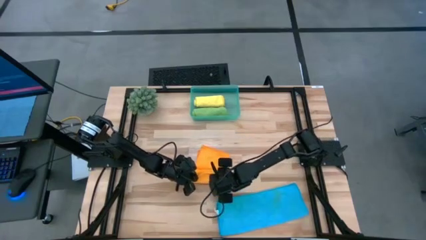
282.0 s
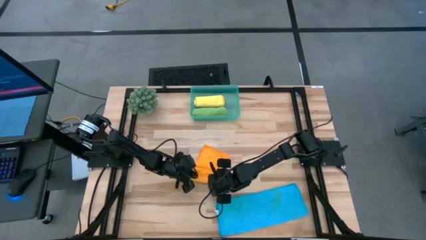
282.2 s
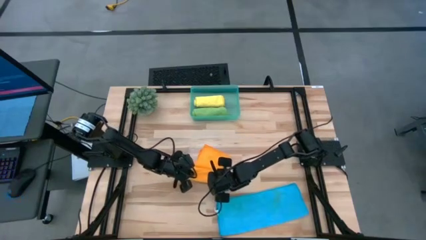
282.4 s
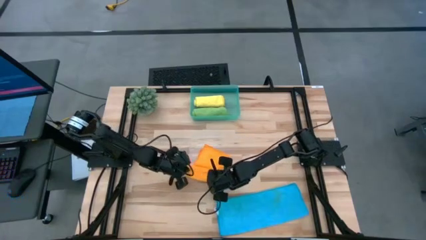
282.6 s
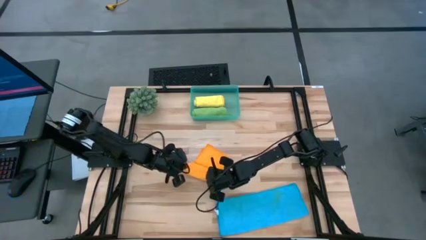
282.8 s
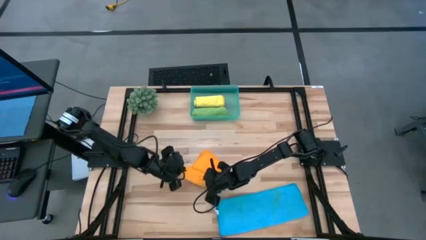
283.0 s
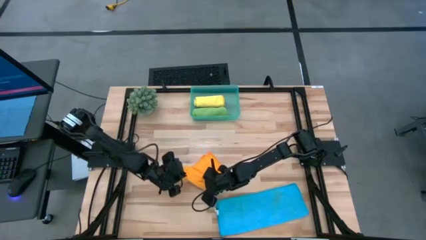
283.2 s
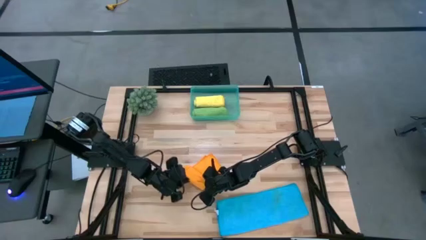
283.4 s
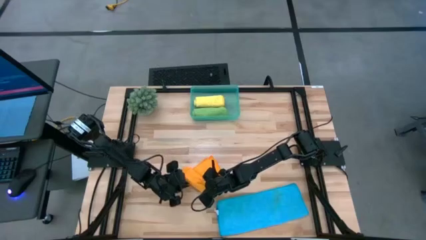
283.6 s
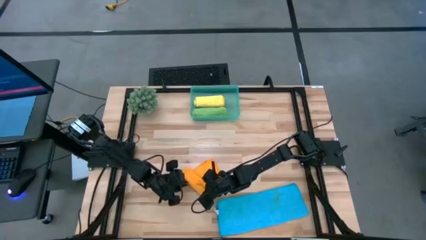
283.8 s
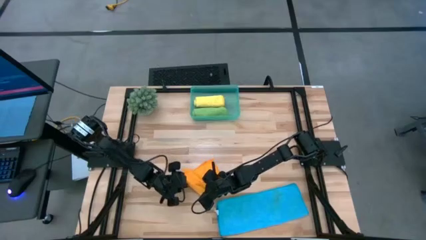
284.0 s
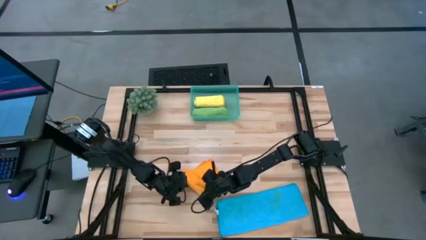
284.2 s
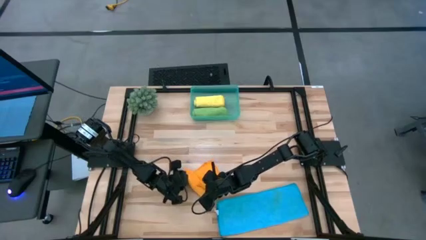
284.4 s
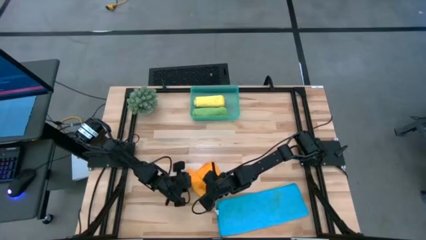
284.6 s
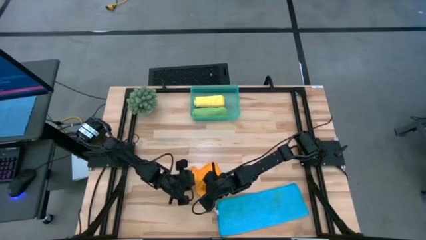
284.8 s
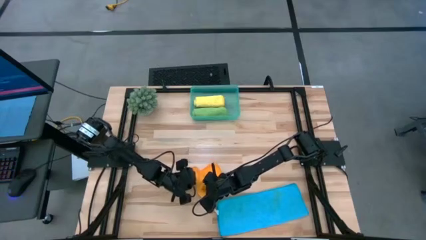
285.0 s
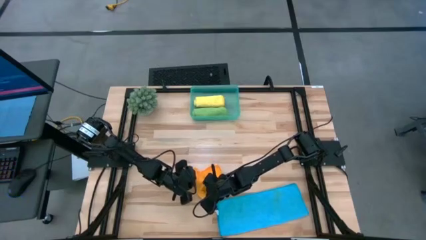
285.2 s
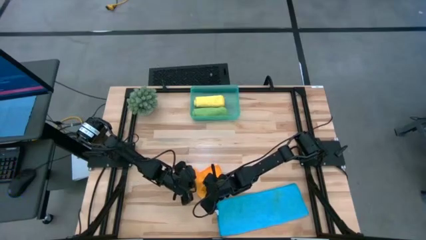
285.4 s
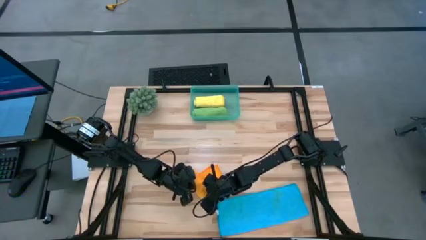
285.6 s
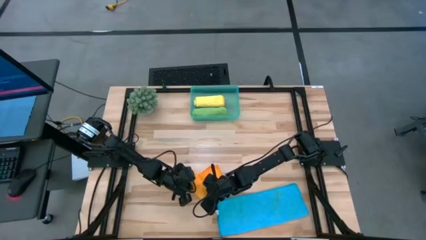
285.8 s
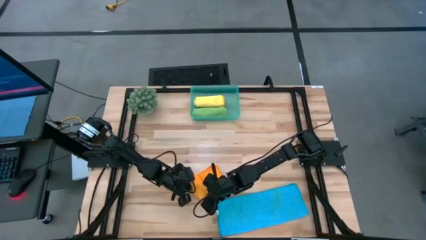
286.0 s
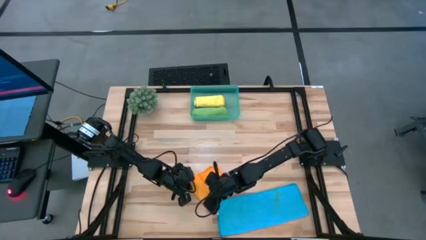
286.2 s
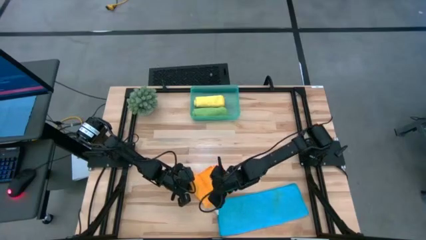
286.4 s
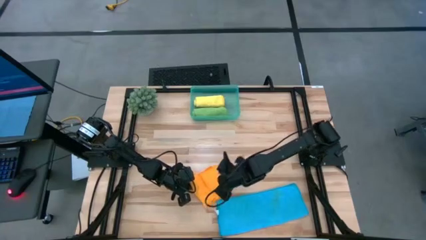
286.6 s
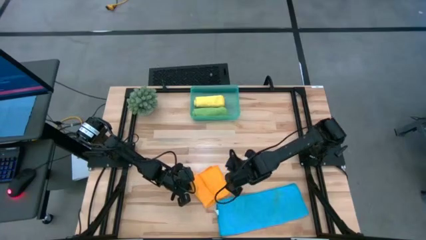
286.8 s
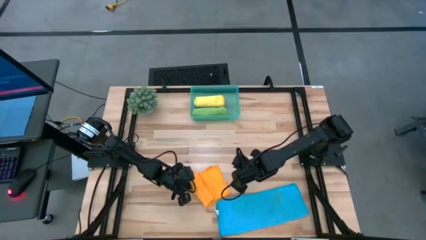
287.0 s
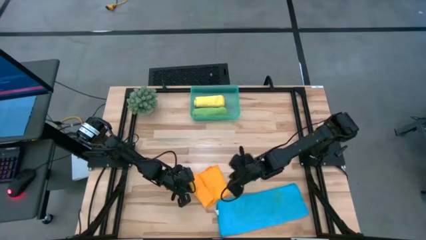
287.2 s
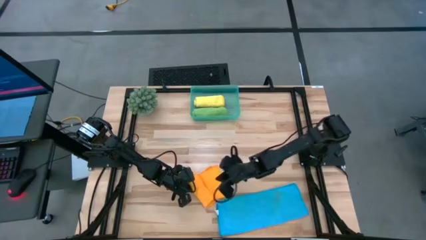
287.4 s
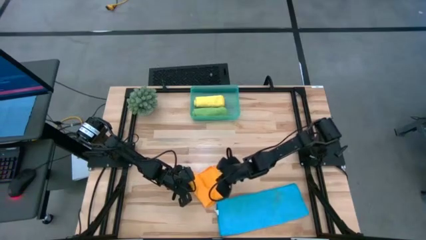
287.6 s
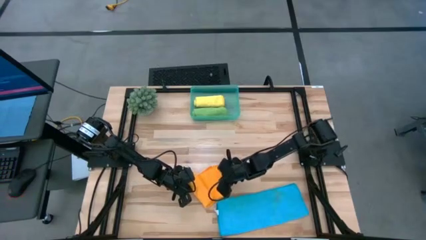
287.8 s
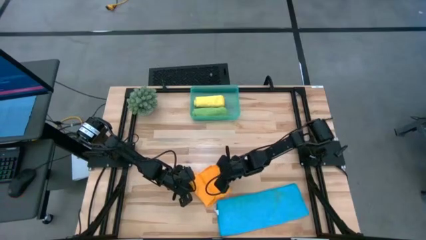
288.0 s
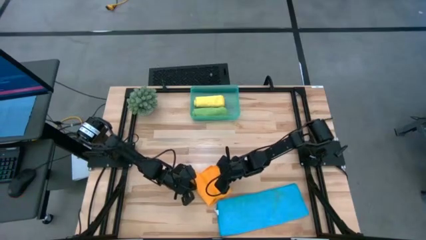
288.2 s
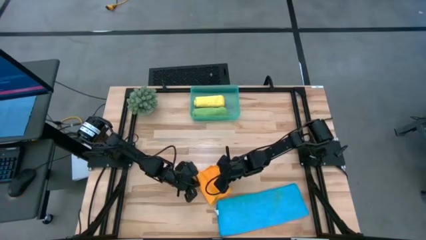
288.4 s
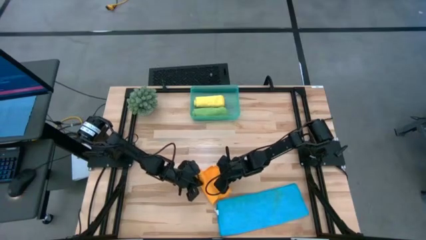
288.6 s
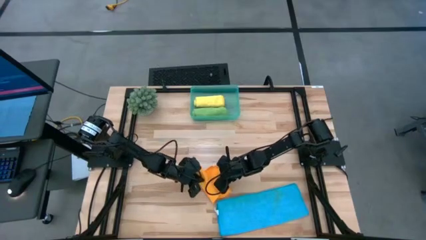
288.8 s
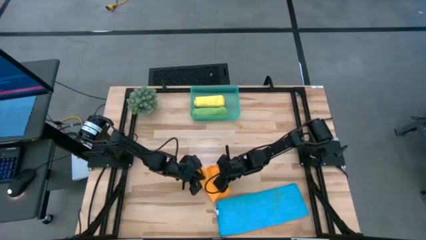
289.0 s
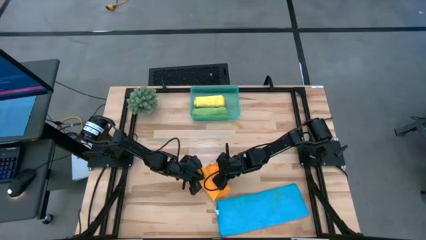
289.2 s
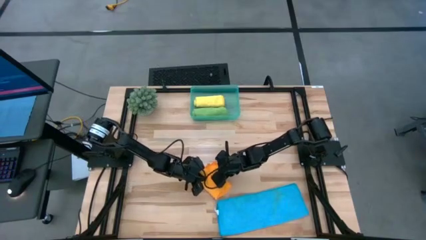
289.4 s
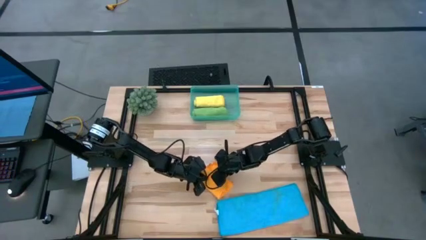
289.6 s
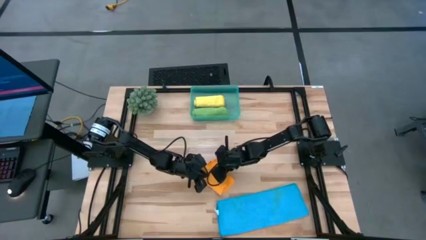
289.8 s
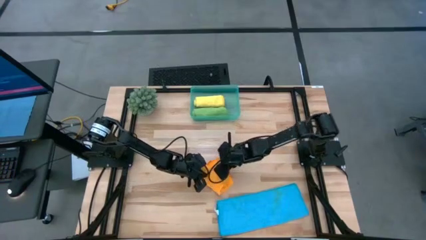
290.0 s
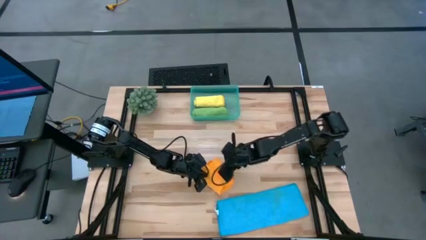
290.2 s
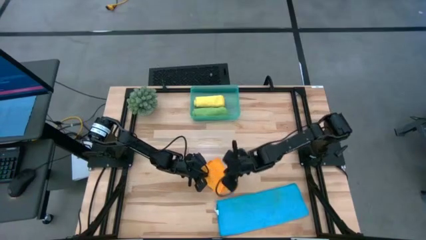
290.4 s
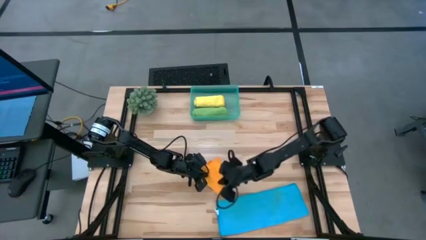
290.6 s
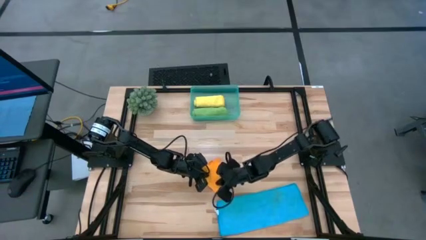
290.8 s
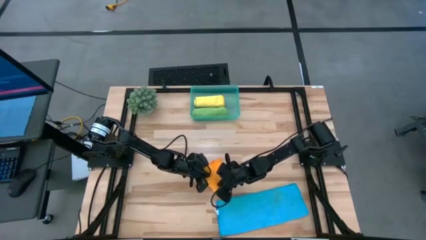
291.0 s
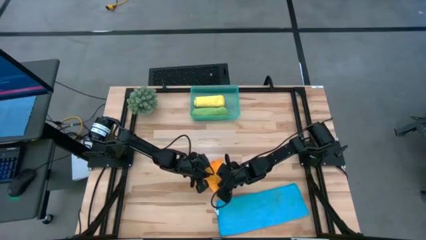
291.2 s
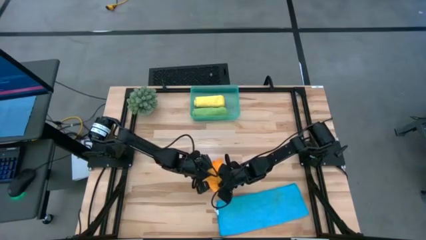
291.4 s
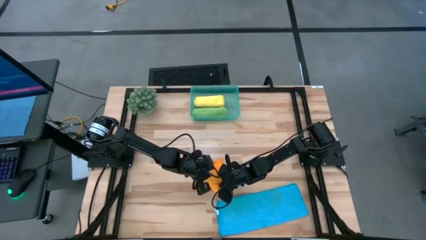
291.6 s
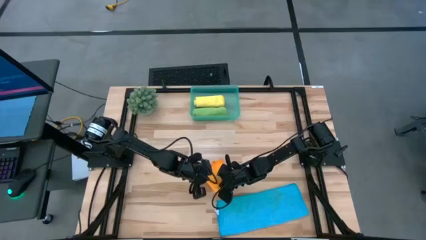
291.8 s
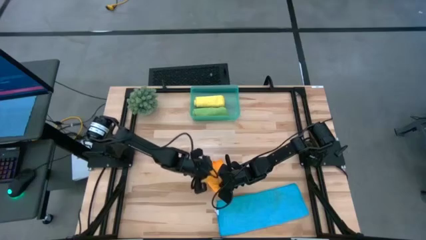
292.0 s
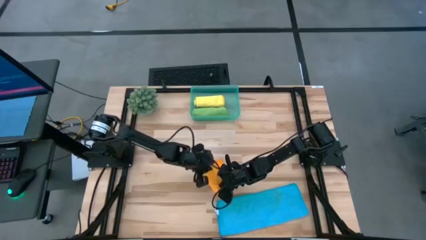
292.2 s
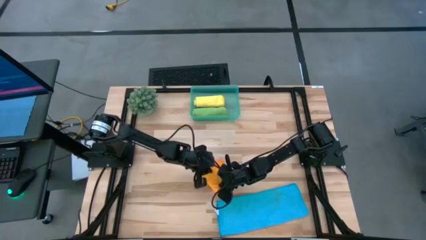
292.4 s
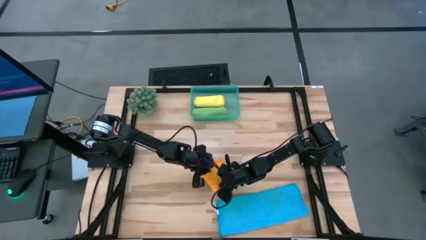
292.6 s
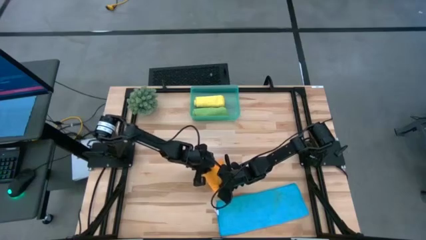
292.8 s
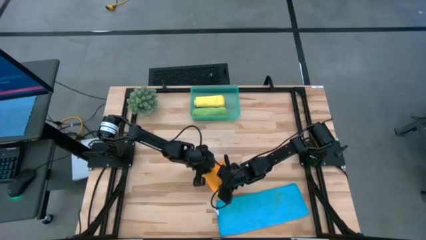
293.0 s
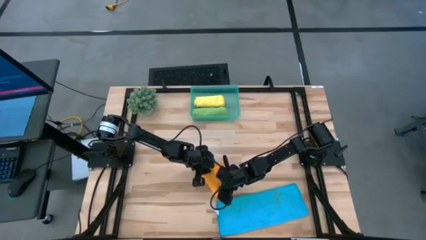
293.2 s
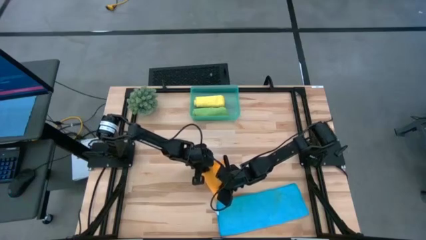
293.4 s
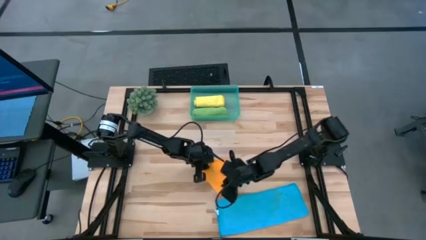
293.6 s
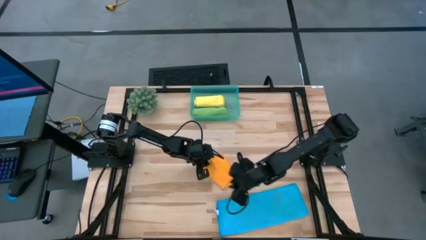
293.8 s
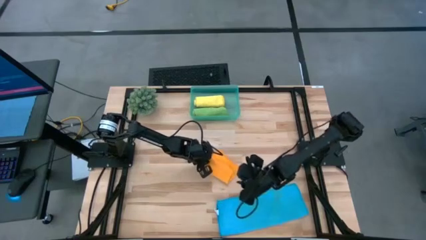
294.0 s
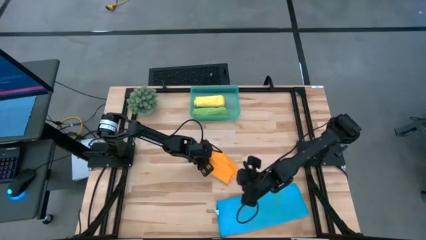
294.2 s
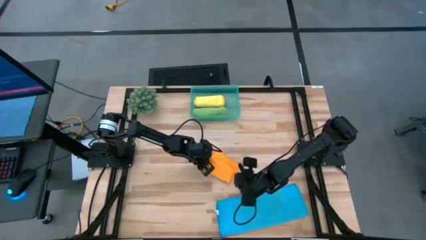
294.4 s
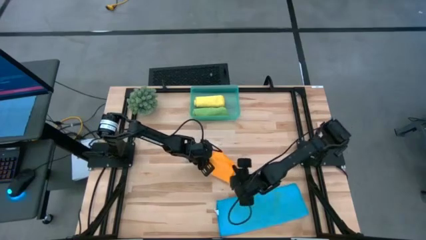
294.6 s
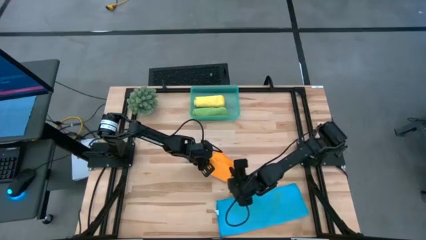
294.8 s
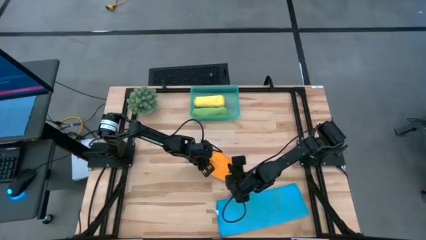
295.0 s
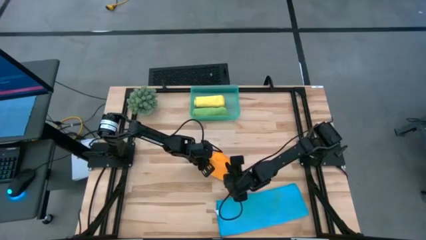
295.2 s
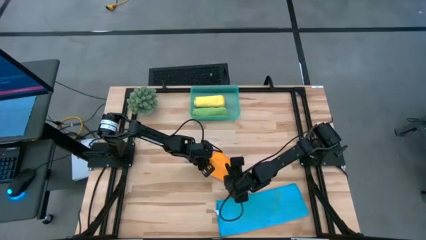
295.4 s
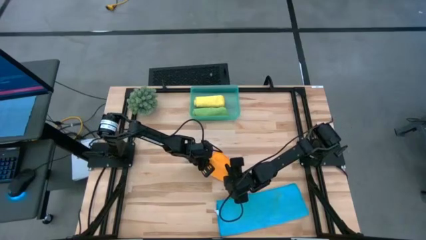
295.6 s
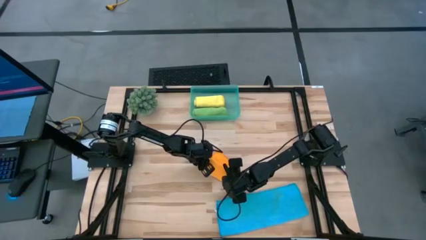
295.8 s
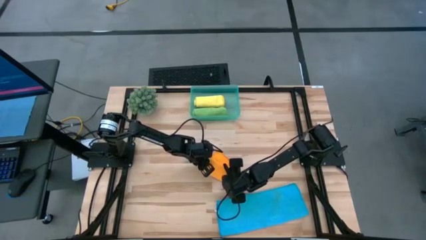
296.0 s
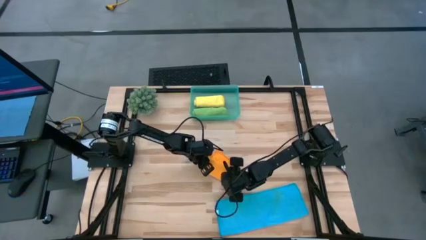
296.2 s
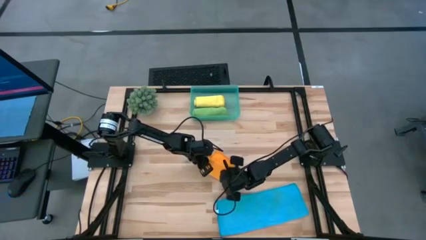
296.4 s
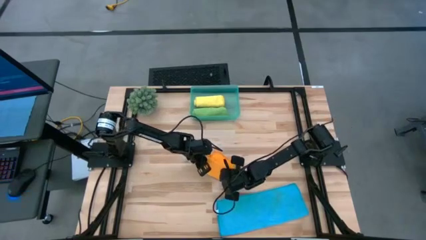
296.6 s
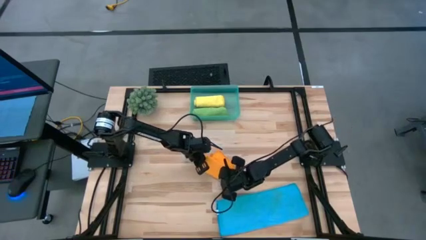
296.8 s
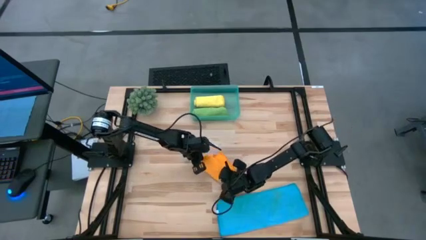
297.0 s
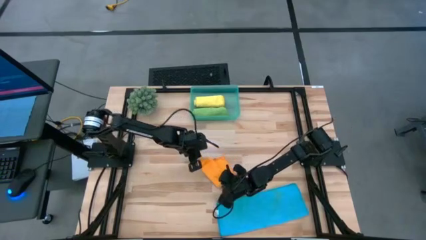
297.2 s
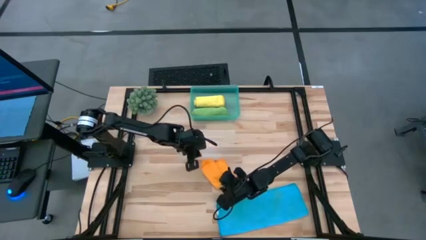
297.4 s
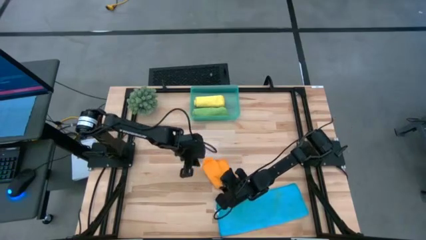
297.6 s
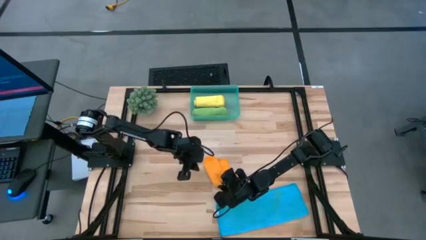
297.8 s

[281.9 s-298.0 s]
Task: Roll microfiber towels into tight, uniform cylinder then place into a basket
Roll the orange towel
